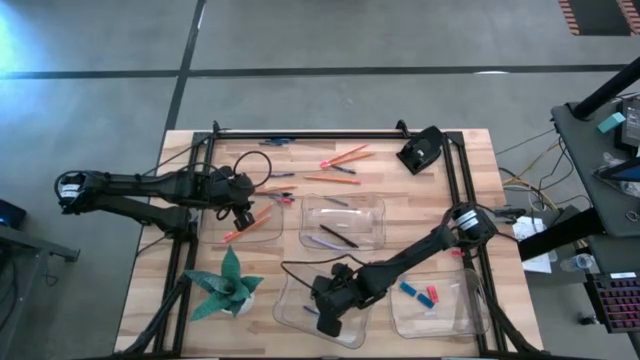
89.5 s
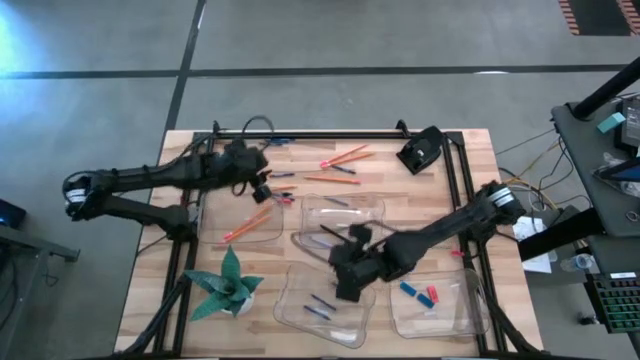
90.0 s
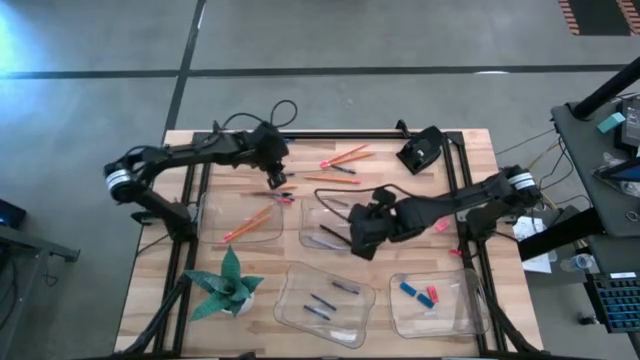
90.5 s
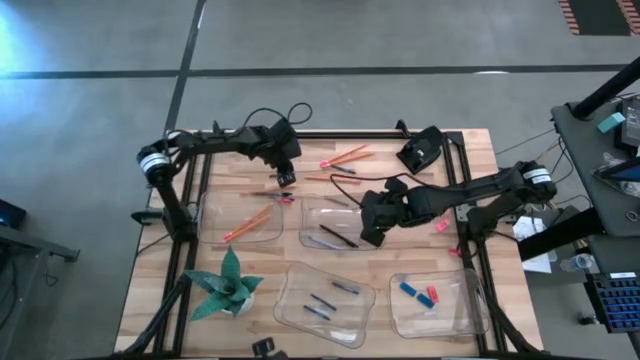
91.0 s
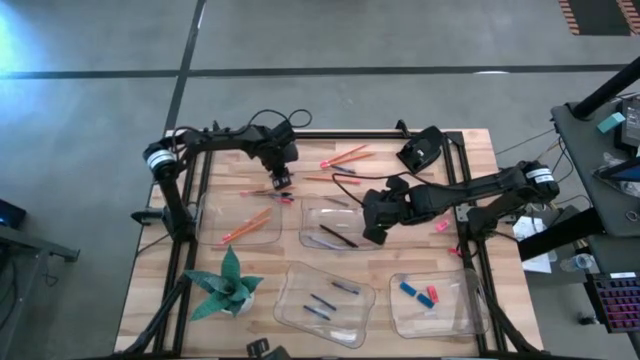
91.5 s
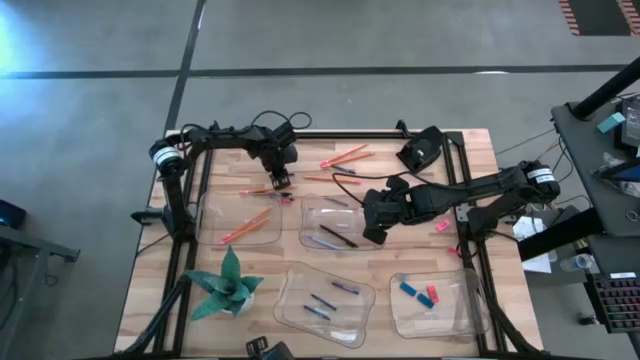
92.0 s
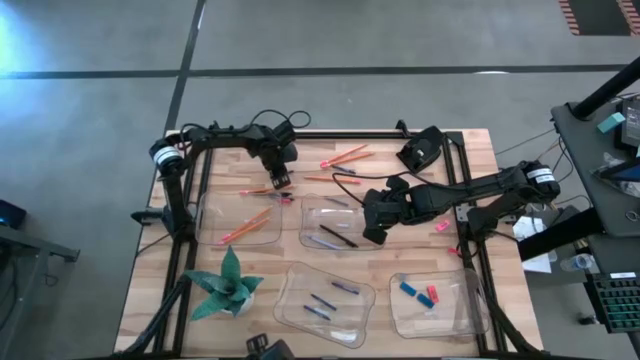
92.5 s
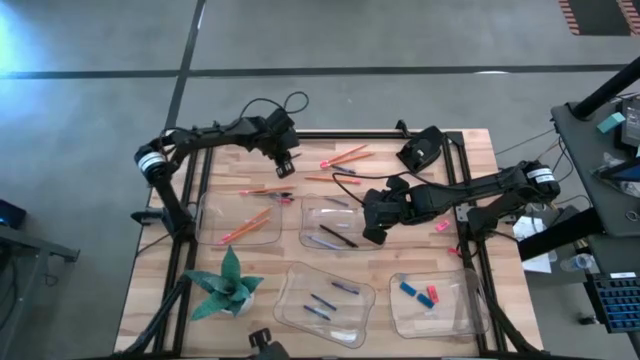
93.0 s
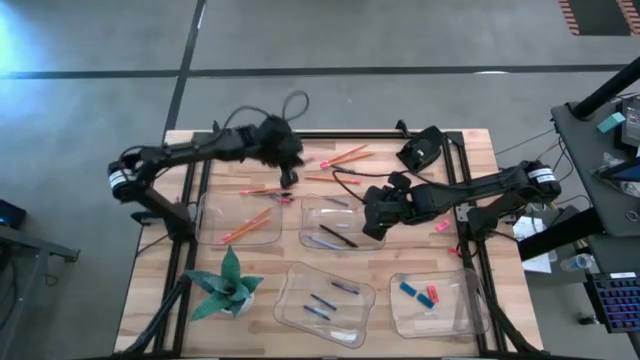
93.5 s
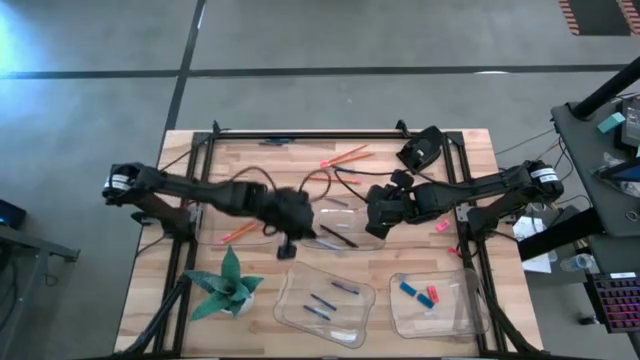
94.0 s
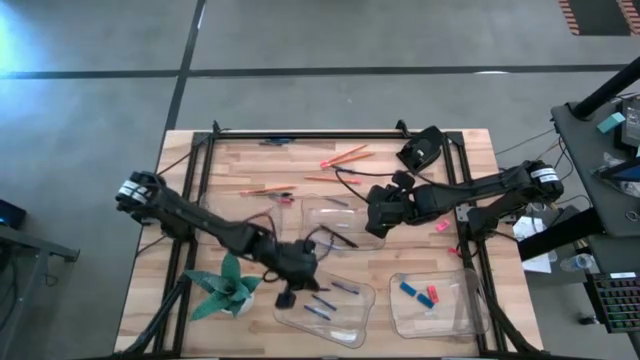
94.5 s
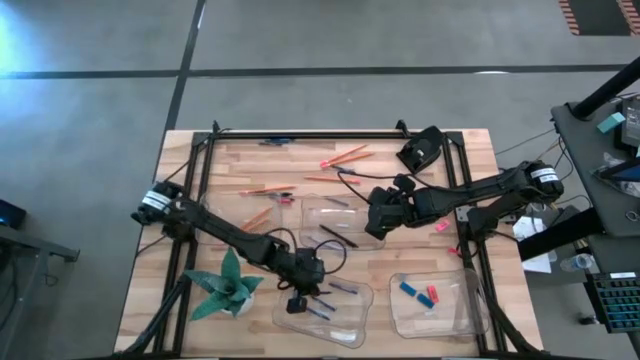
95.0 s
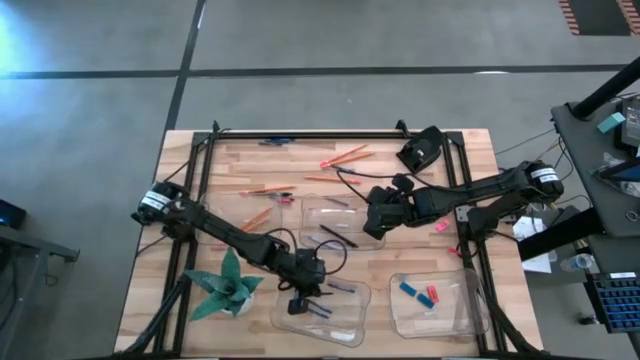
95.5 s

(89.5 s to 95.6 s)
Task: Sort crayons/erasers/pens/pencils in bins
Put the blue crayon into the bottom left transparent bin

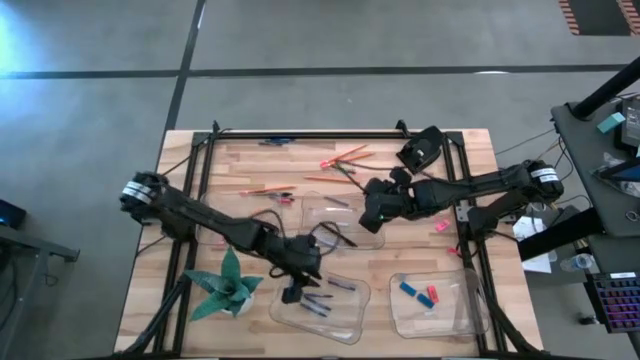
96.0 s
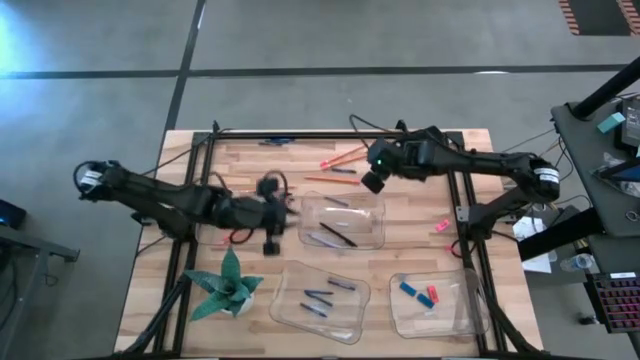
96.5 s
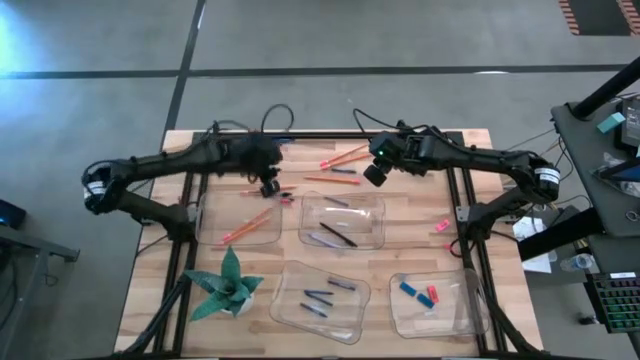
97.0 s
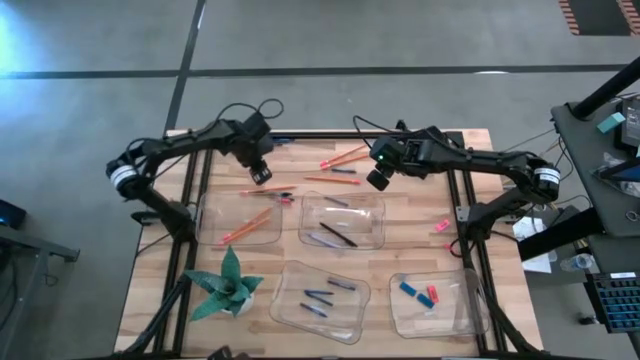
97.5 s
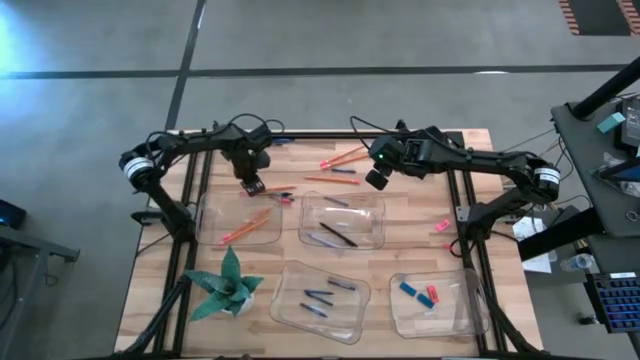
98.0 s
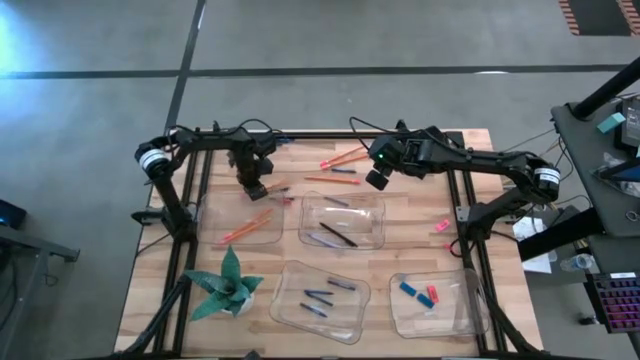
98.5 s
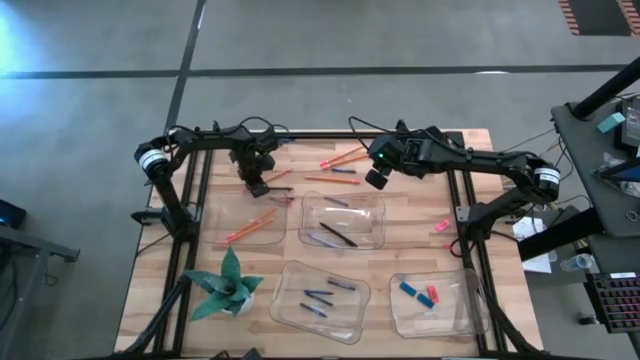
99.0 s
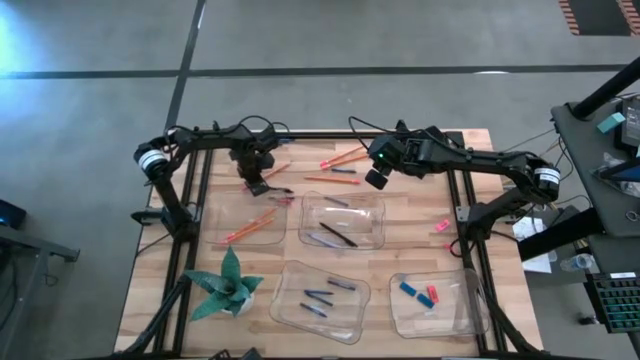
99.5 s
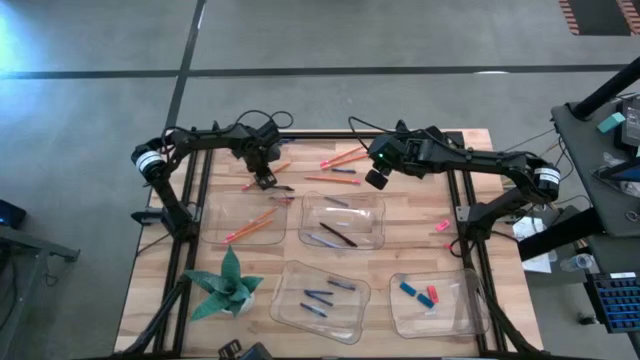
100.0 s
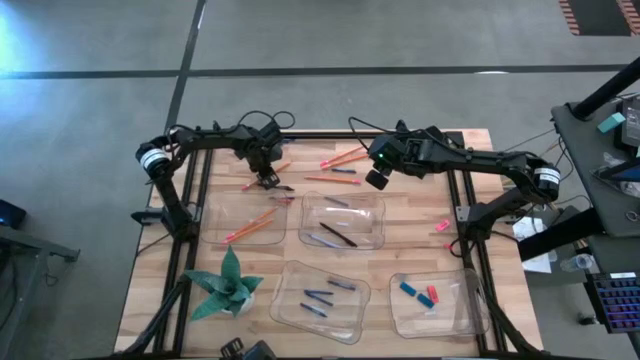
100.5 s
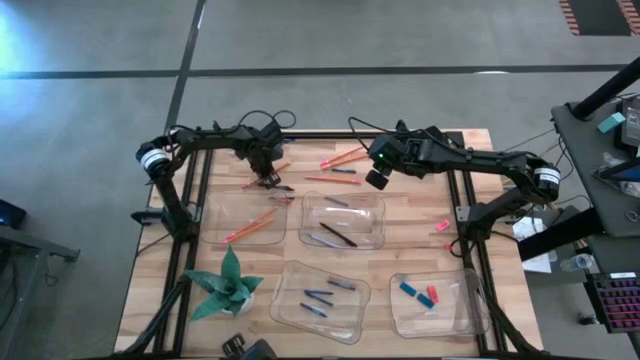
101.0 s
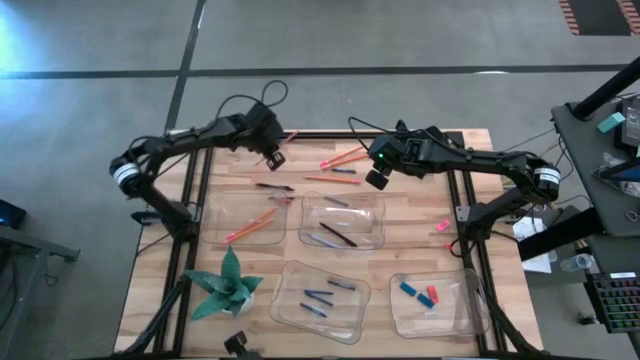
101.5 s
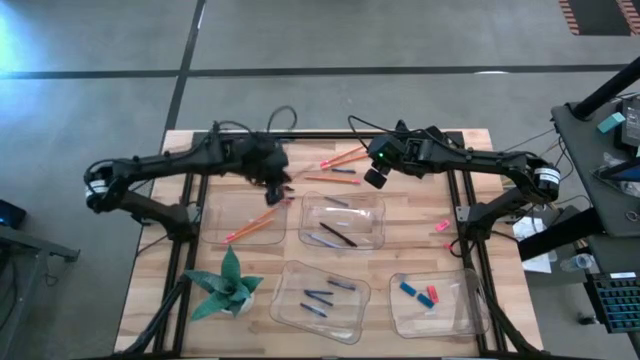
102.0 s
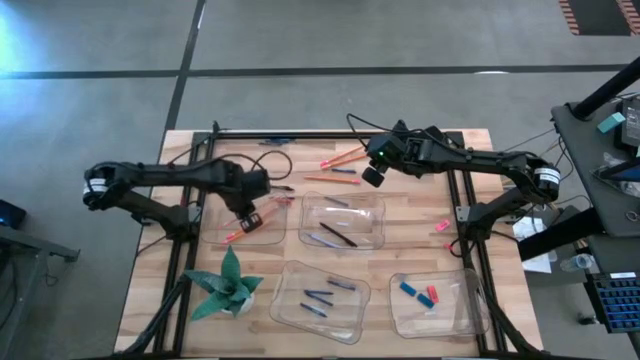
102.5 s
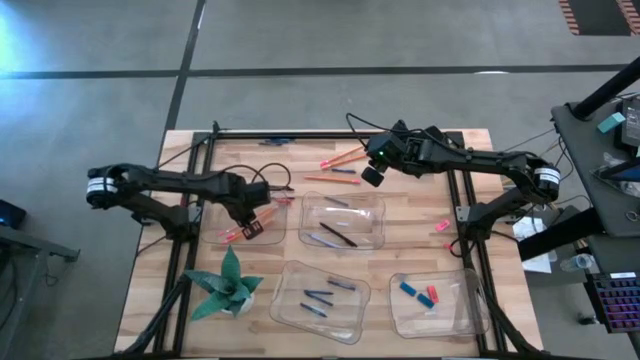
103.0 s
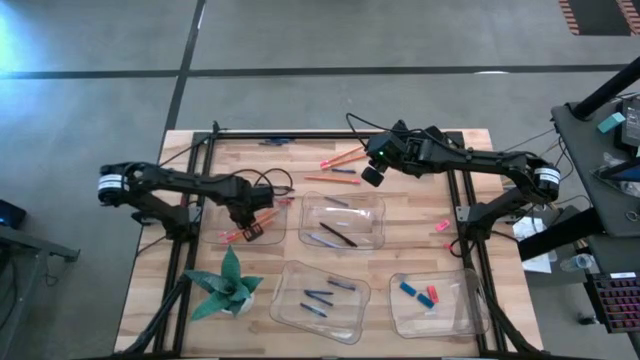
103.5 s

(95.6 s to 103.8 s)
Put the orange pencil into the top left transparent bin

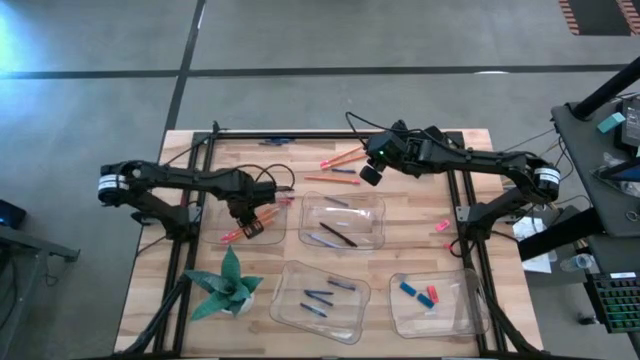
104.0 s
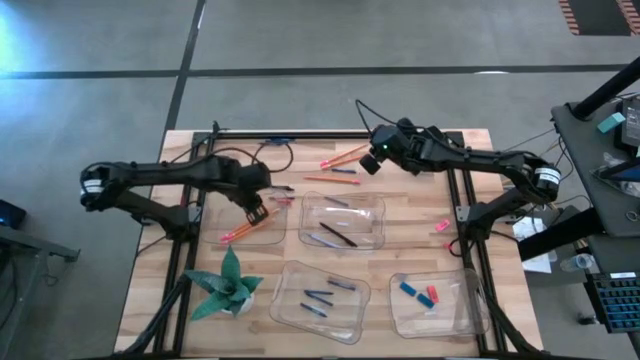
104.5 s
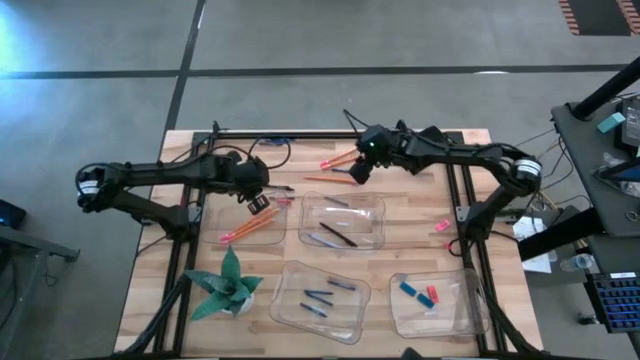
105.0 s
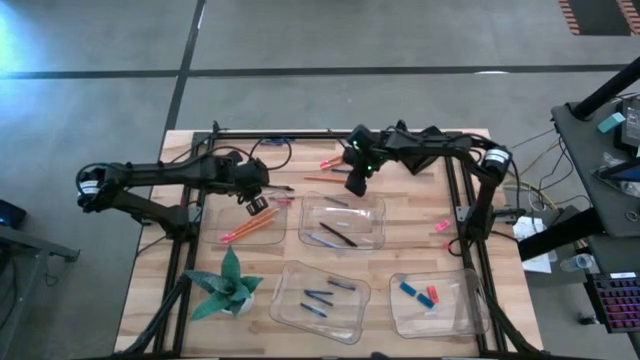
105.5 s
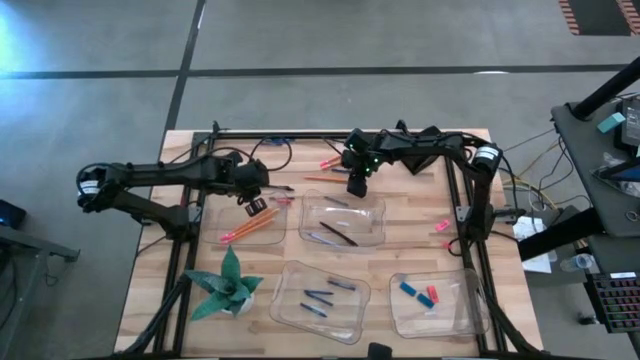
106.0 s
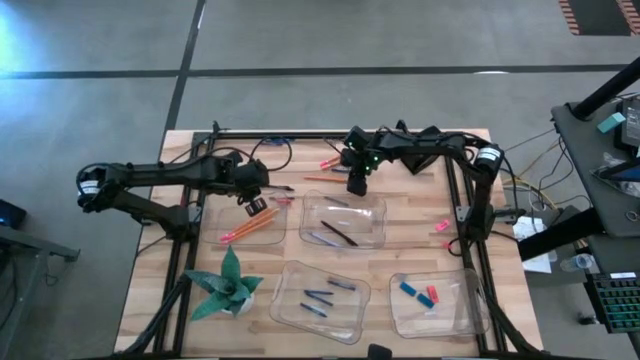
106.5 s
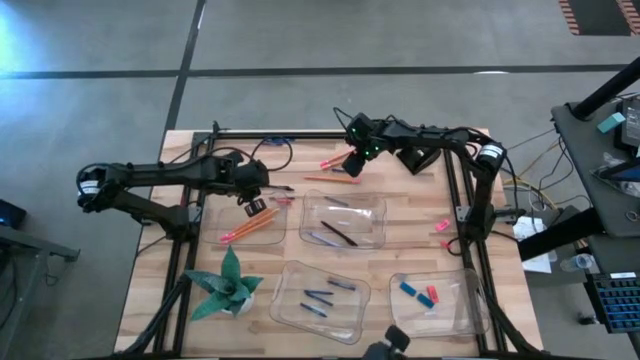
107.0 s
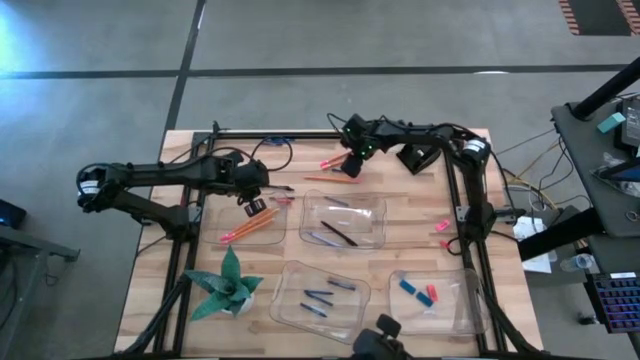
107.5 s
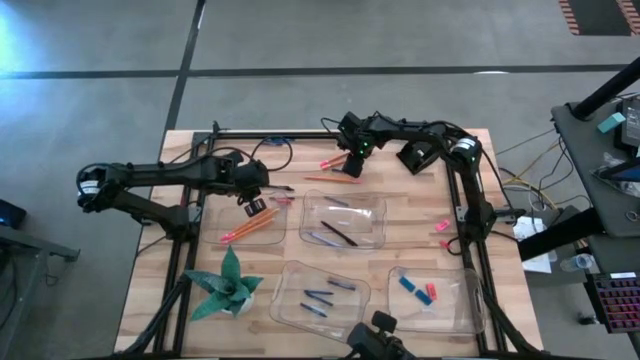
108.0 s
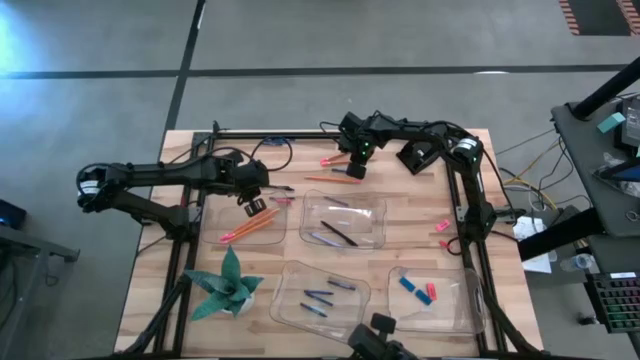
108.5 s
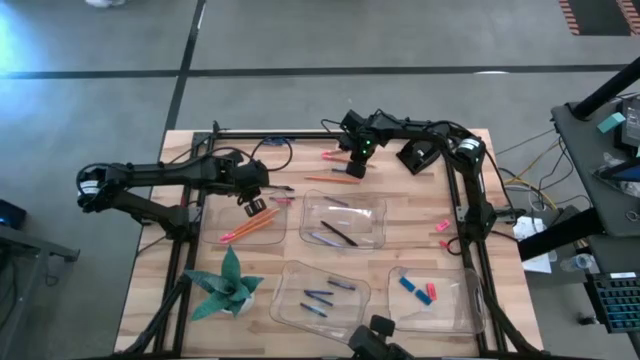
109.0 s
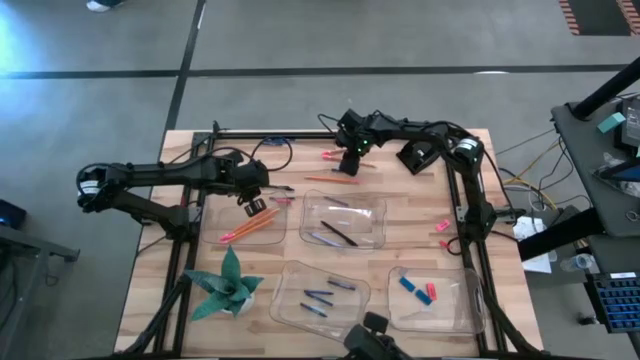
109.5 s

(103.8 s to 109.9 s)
Put the orange pencil into the top left transparent bin
